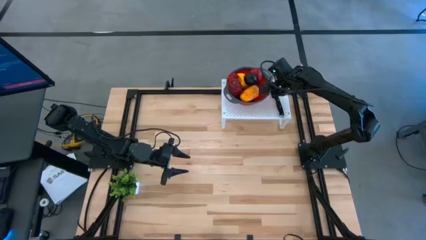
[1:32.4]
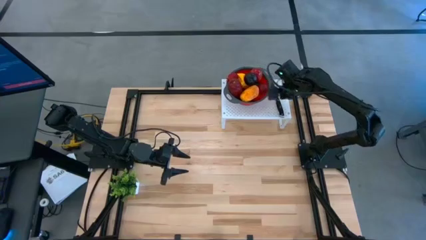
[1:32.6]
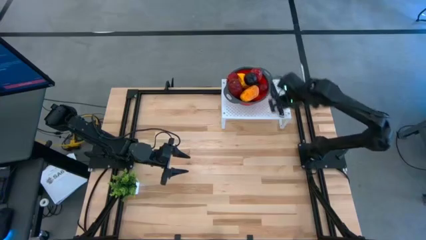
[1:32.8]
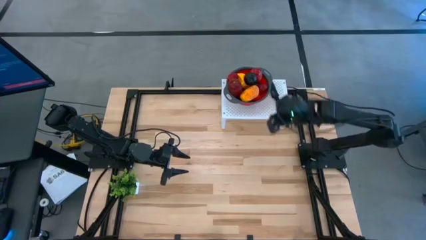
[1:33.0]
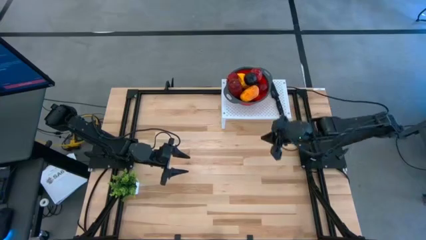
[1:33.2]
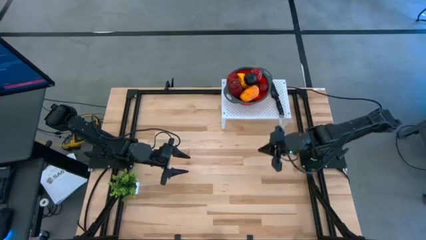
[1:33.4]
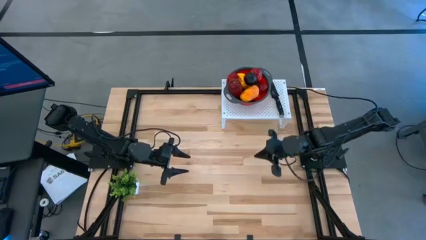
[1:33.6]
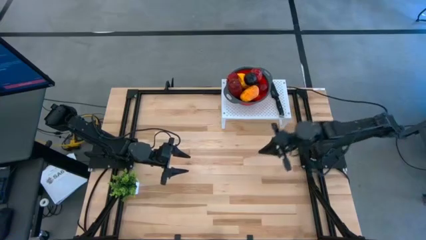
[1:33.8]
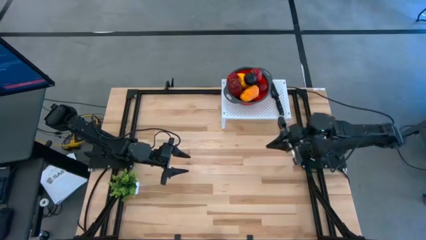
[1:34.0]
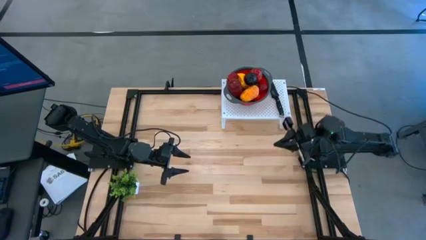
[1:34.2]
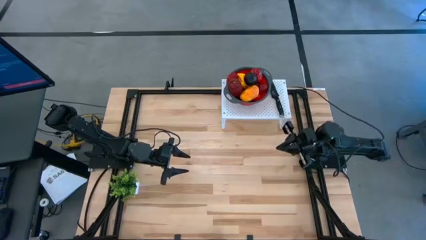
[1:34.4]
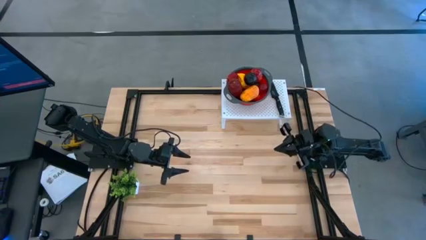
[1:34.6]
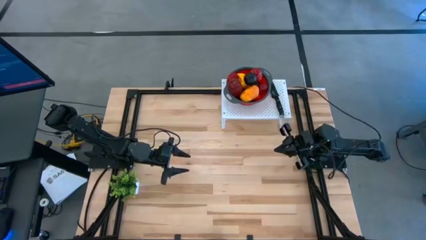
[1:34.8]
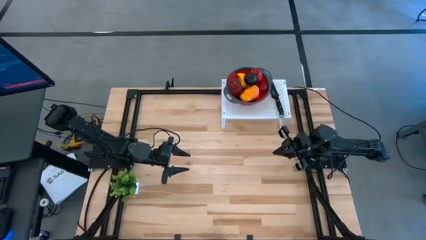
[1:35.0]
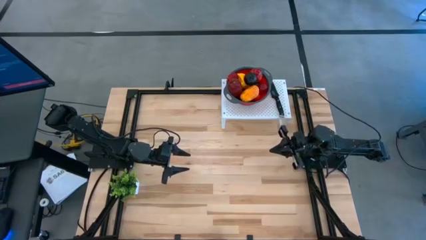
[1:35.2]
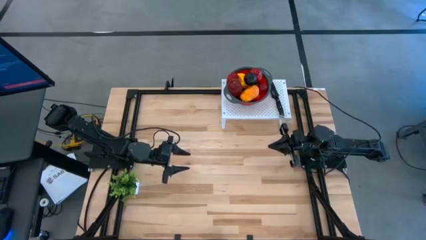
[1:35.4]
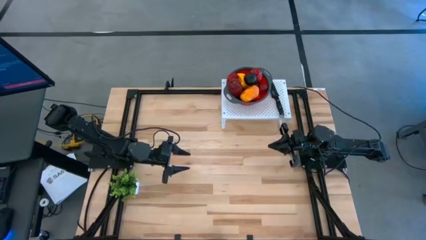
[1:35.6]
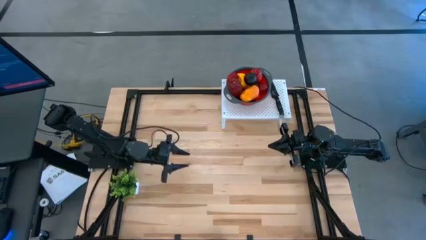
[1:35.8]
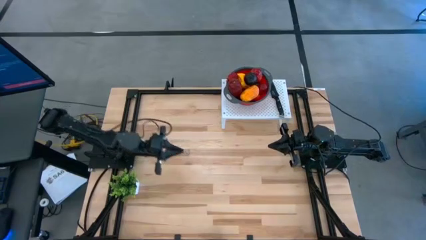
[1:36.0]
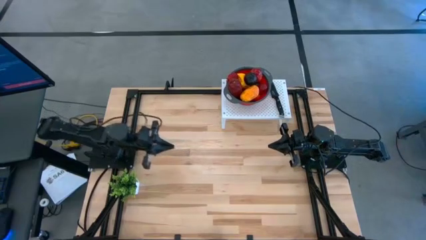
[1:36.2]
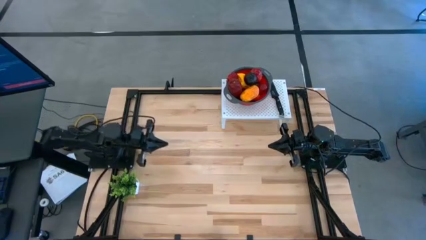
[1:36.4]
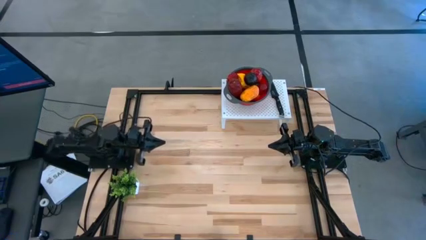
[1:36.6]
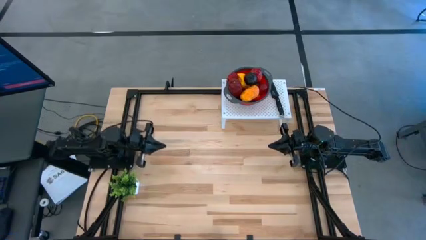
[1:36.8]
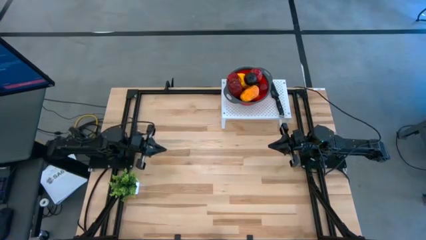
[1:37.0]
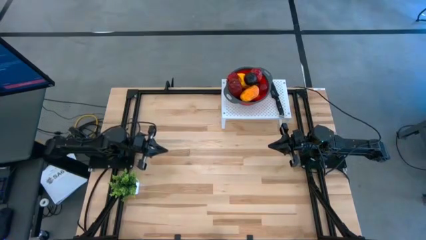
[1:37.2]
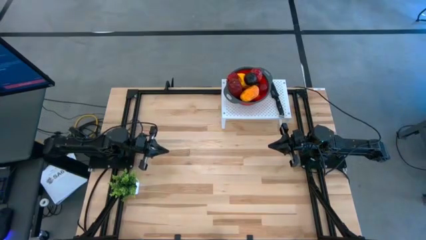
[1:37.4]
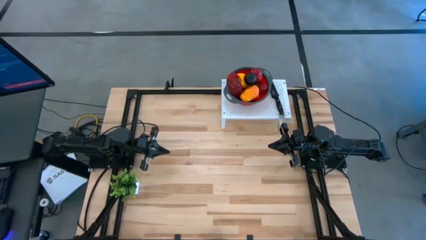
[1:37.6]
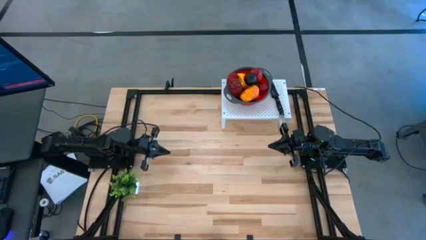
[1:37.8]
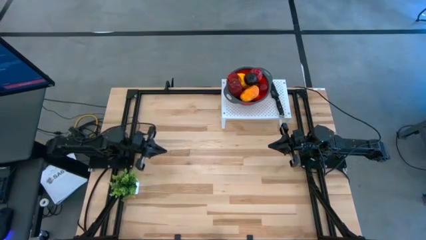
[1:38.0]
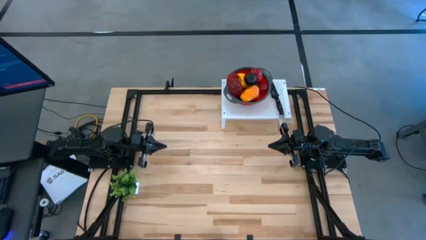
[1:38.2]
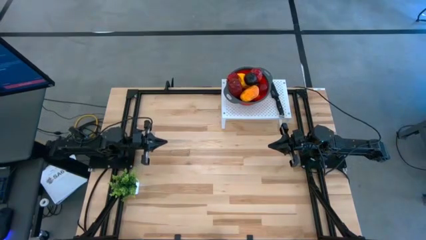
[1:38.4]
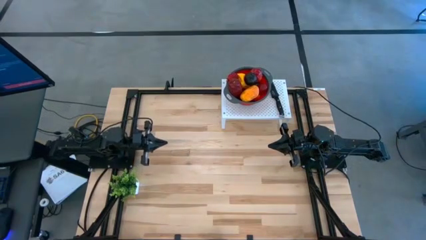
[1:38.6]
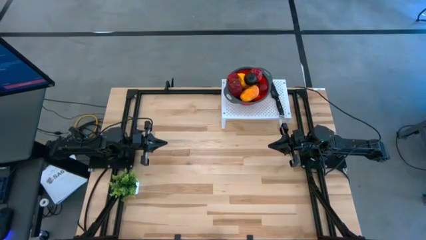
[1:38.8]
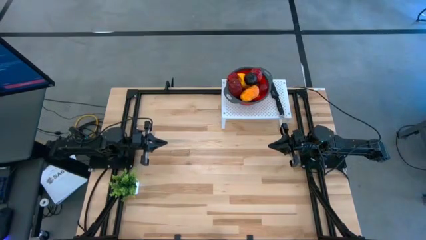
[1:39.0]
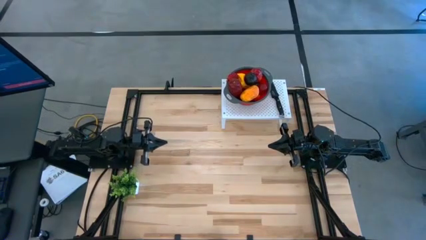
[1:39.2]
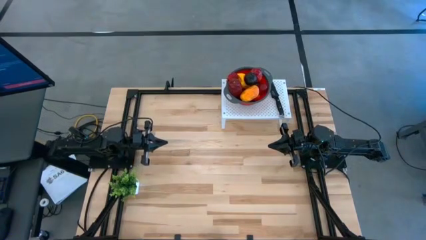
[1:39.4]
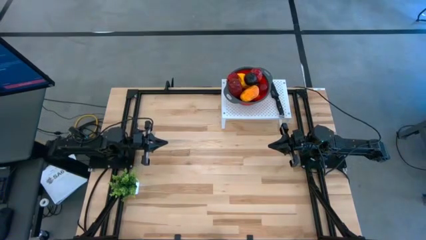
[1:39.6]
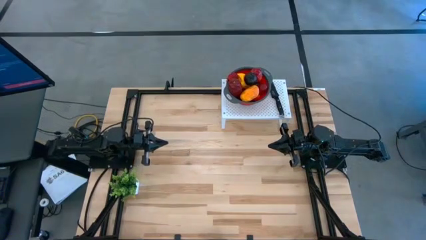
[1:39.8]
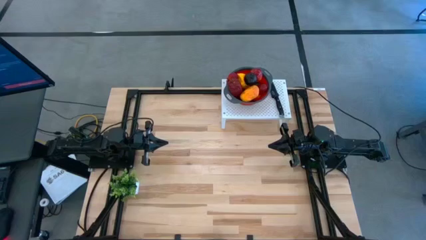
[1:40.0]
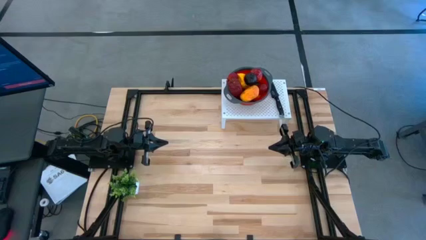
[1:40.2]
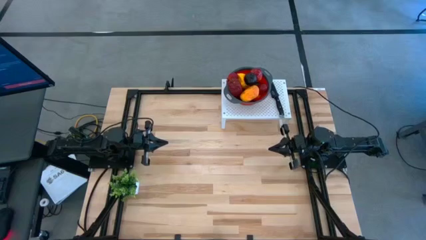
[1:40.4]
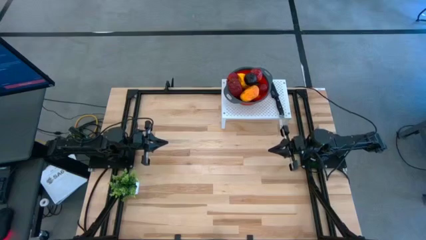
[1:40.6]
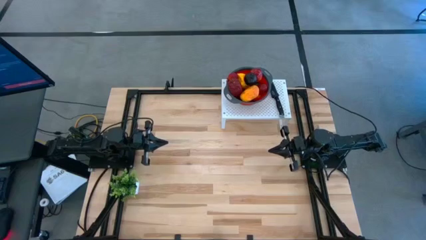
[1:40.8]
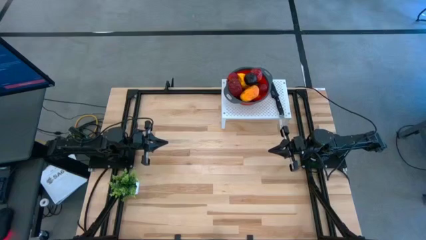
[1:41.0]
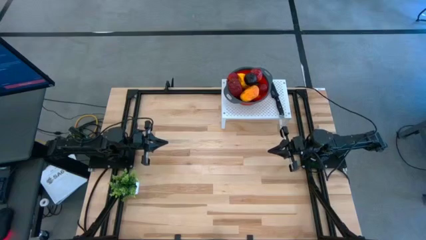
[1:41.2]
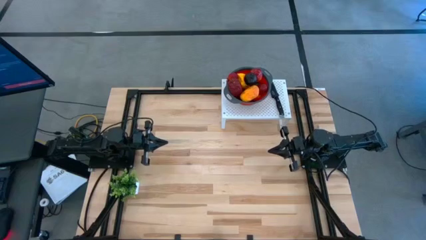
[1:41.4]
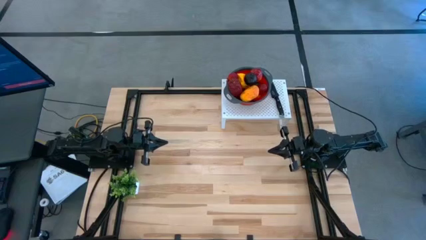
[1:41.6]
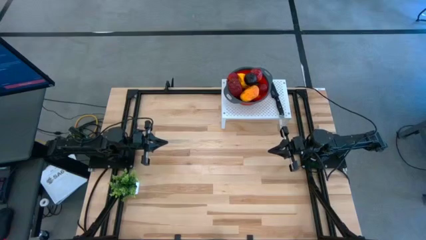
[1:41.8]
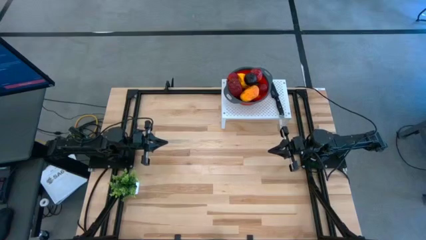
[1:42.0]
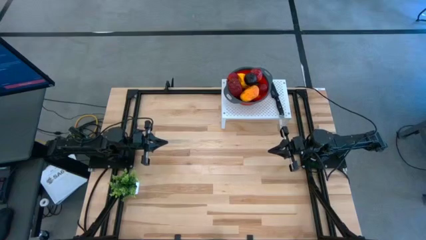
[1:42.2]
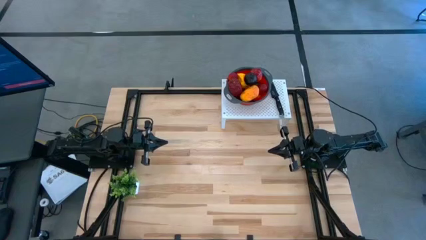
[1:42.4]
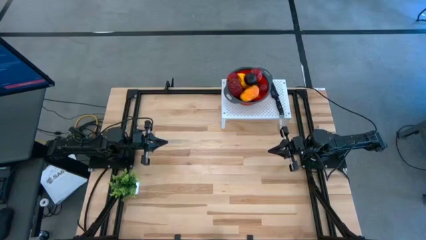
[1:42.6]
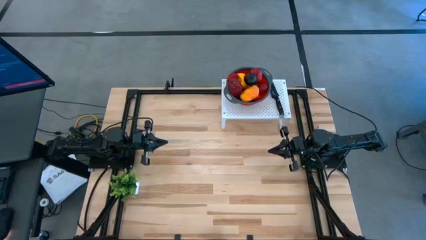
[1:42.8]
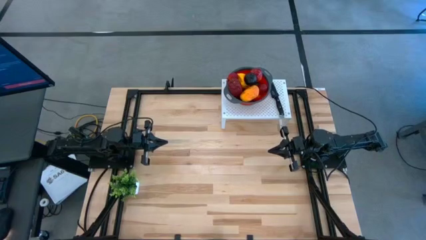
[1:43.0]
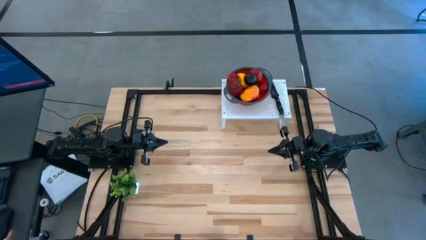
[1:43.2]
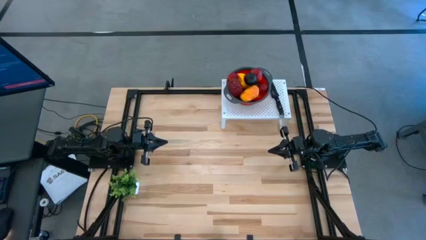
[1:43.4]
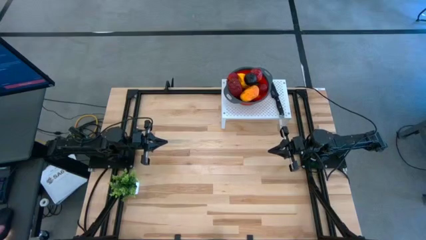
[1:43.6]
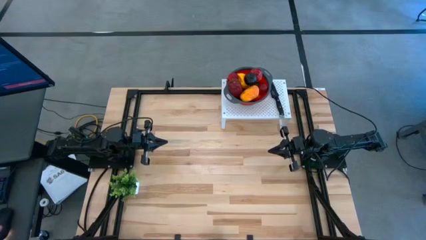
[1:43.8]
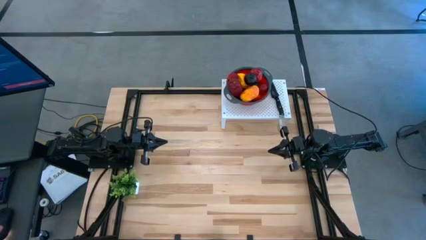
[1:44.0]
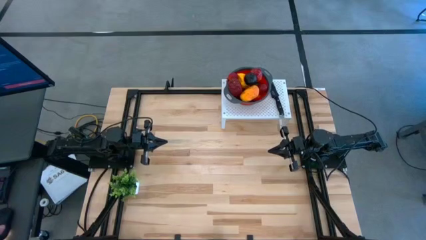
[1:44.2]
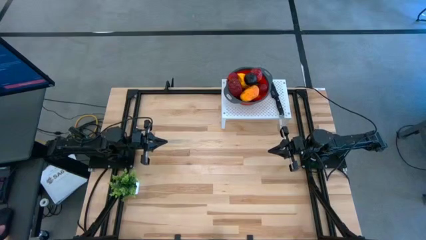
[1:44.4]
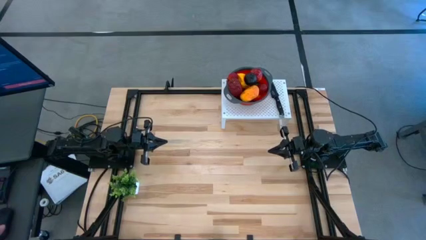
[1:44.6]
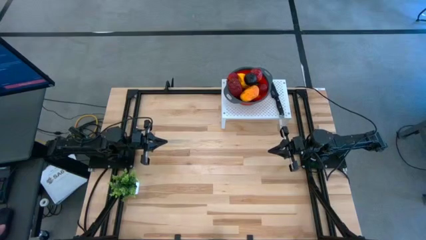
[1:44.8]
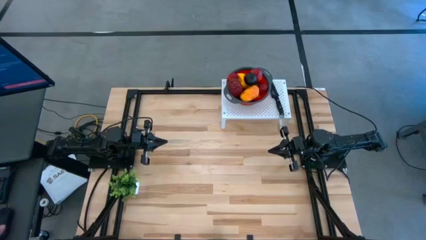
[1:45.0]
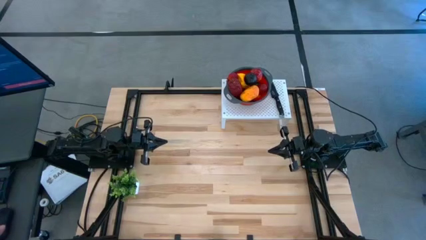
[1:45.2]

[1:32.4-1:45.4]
Task: Pick & Place Fruit
Return to Home Position

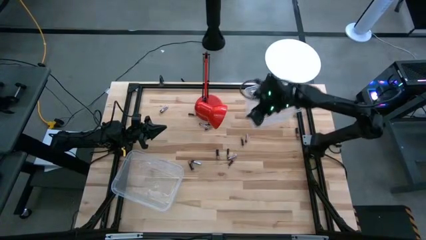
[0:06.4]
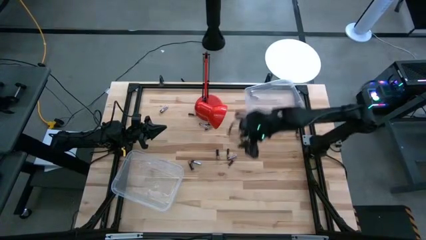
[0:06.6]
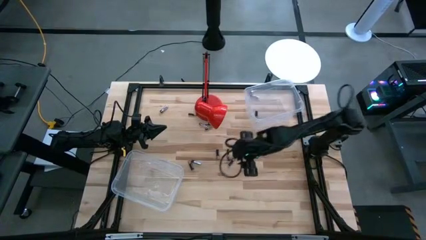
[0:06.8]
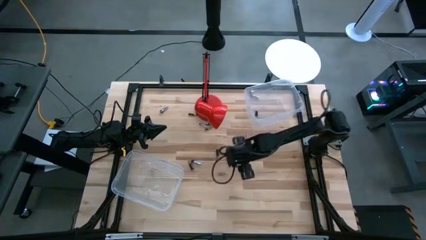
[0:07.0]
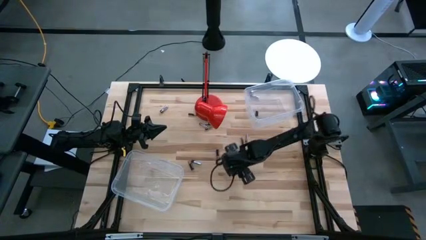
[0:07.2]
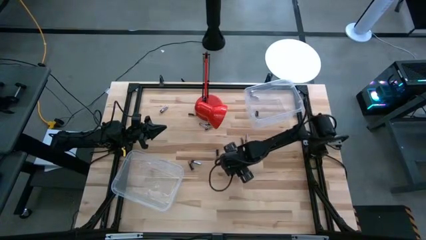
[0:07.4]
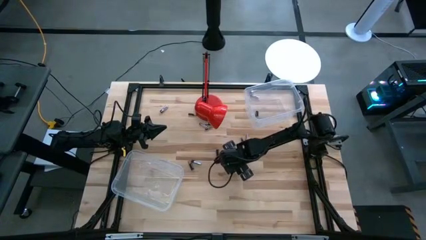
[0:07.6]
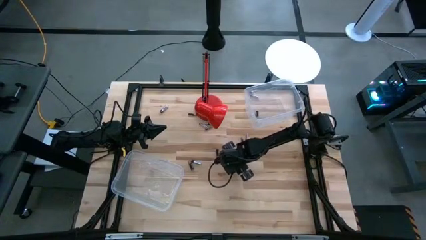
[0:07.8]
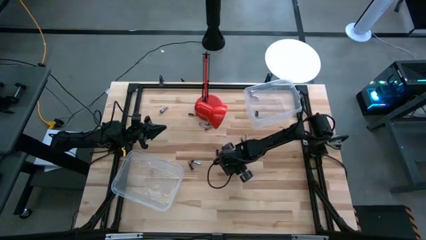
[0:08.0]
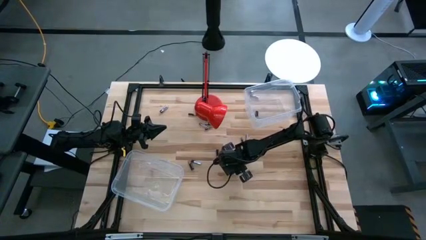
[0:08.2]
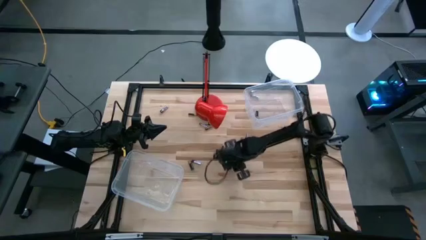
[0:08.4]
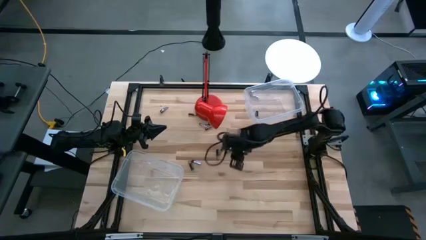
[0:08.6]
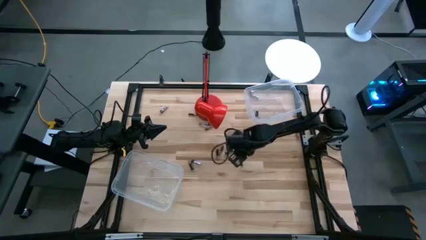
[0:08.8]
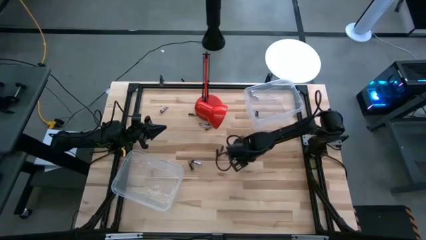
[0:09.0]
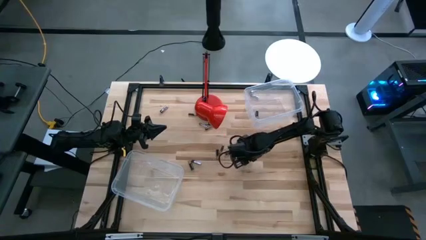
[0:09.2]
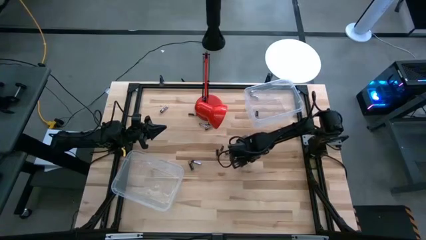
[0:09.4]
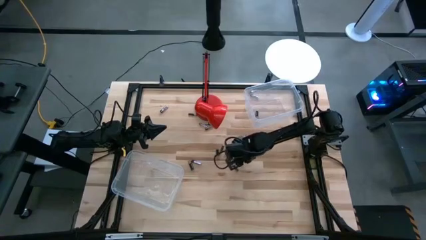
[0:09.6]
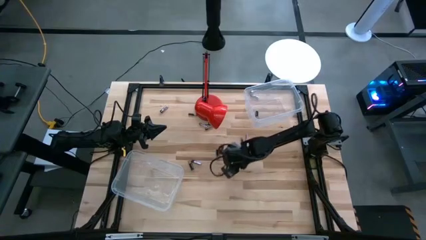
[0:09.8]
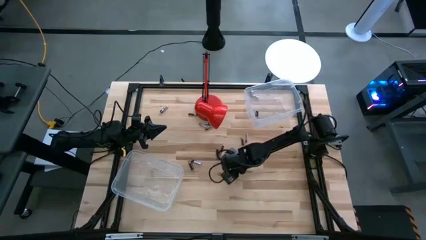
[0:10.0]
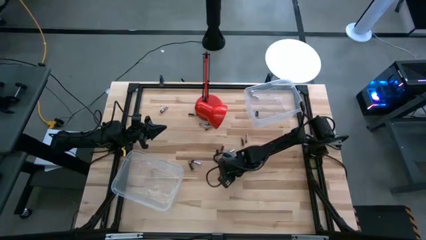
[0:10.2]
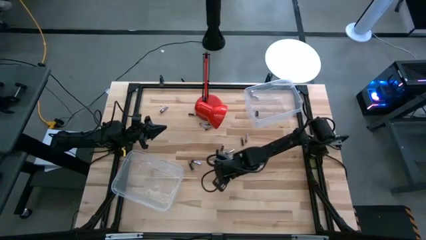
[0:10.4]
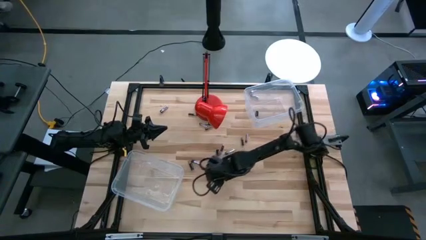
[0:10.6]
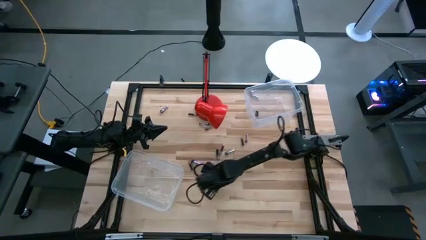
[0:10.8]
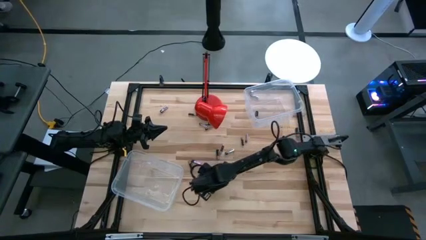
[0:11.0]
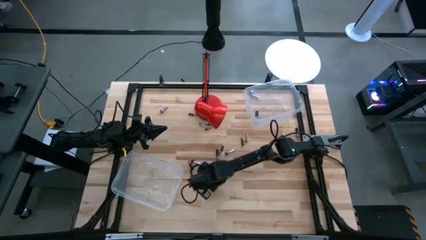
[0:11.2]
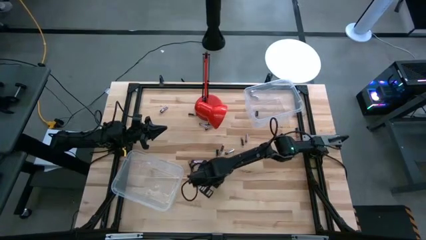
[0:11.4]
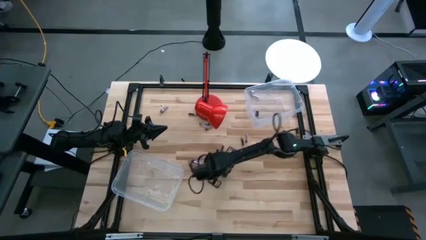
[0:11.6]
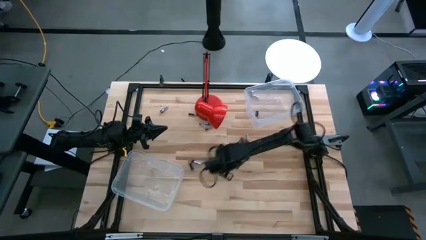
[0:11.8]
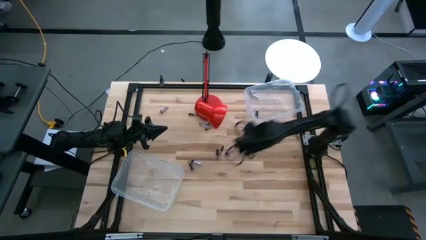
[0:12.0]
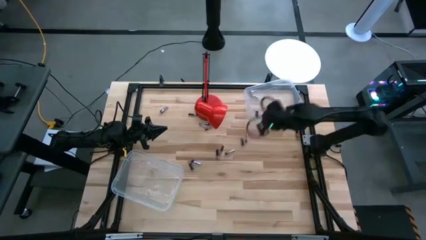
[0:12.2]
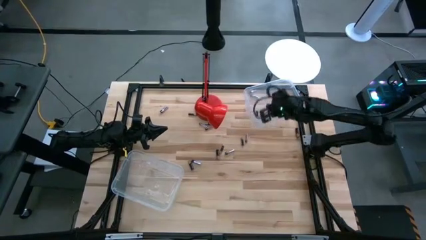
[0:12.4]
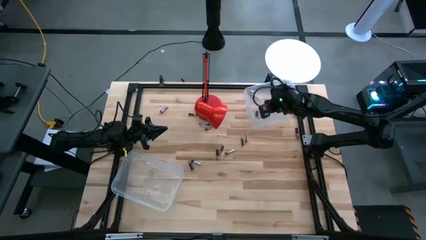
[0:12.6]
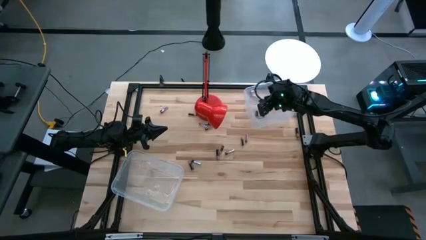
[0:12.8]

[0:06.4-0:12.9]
Task: Sort batteries
Put the black battery into the top transparent bin
